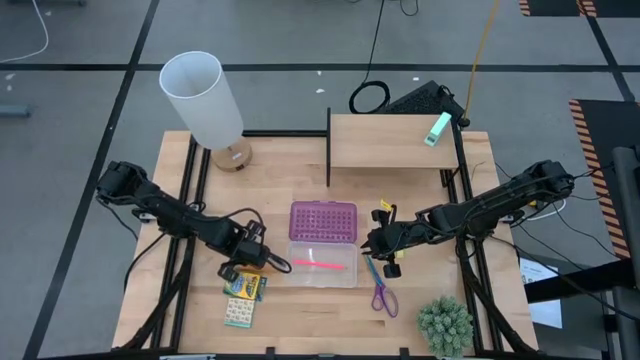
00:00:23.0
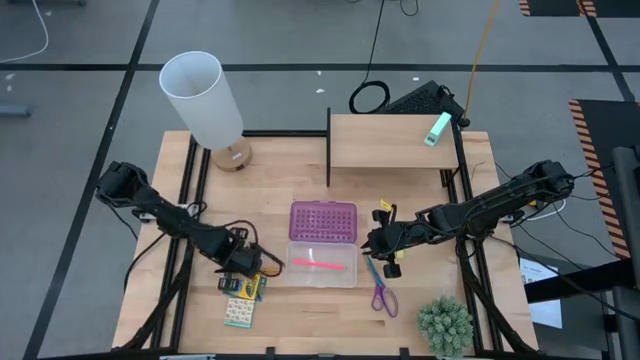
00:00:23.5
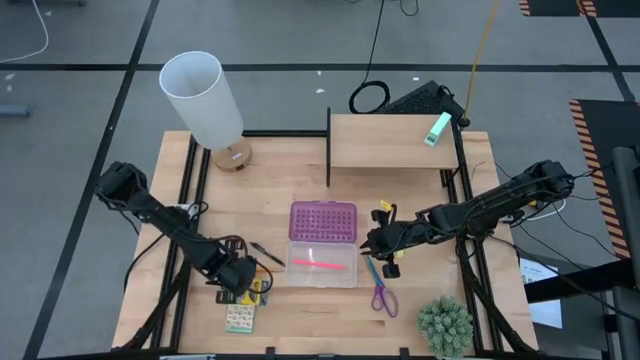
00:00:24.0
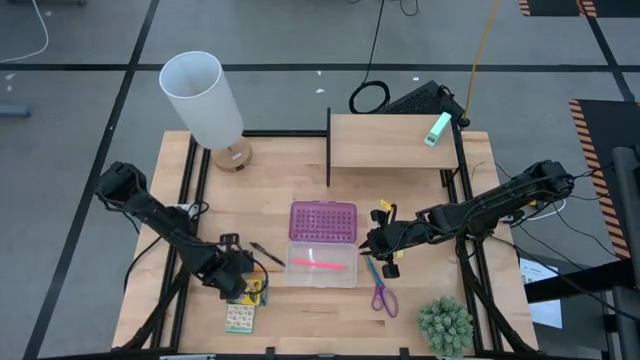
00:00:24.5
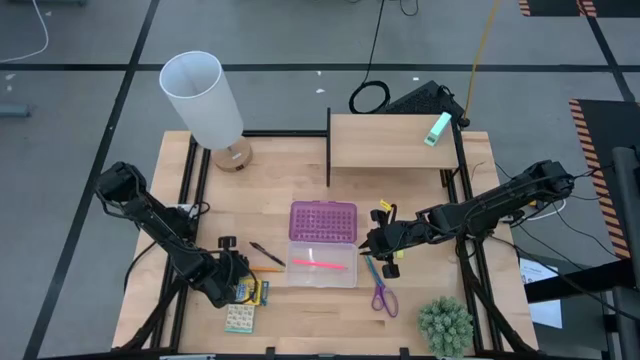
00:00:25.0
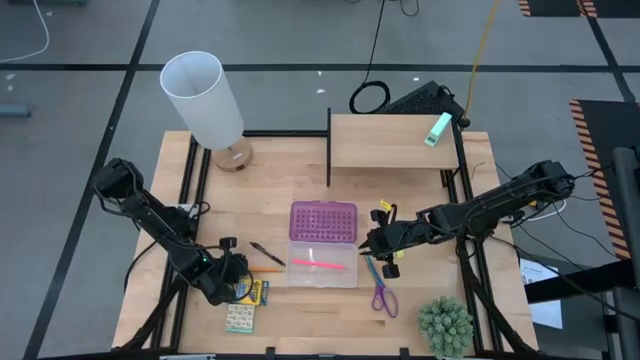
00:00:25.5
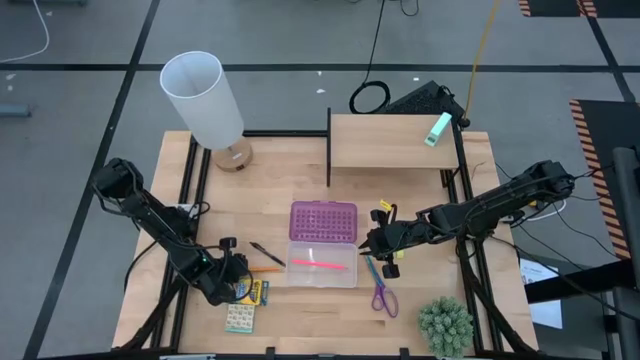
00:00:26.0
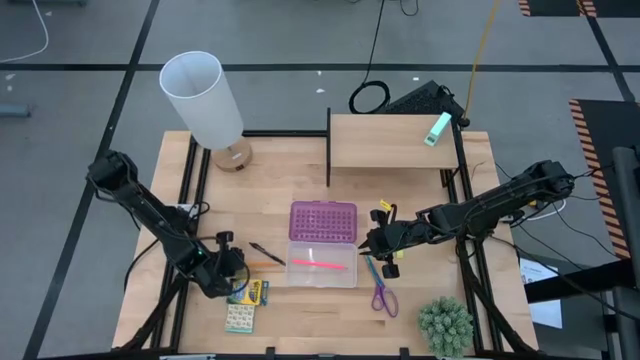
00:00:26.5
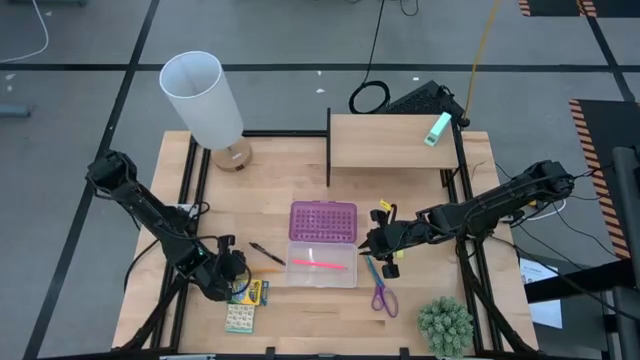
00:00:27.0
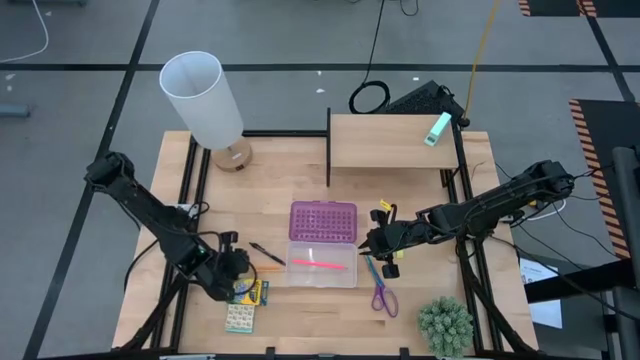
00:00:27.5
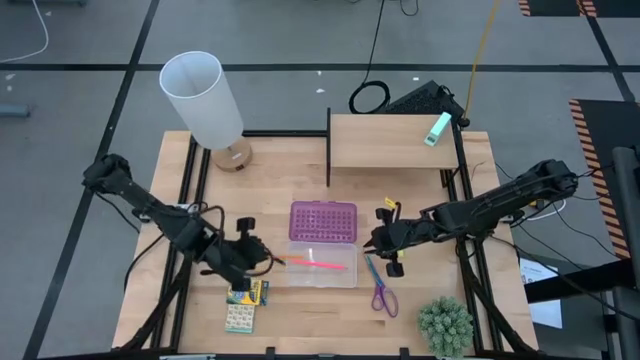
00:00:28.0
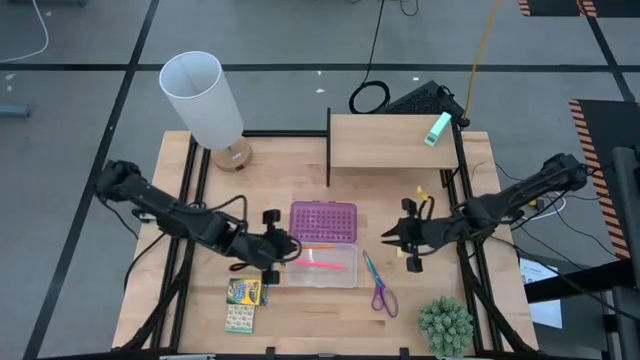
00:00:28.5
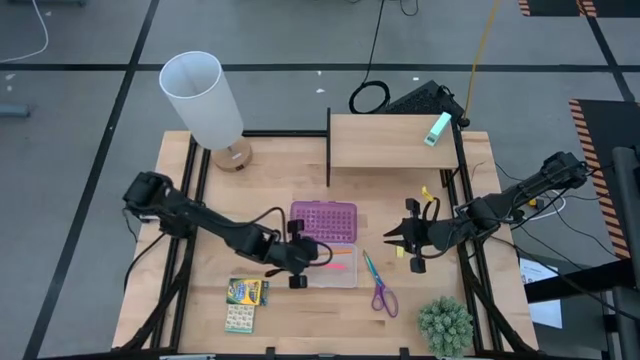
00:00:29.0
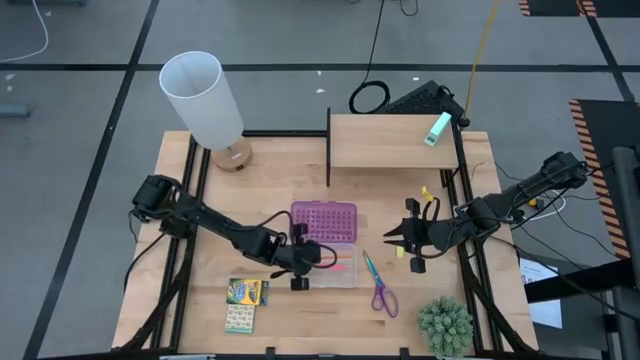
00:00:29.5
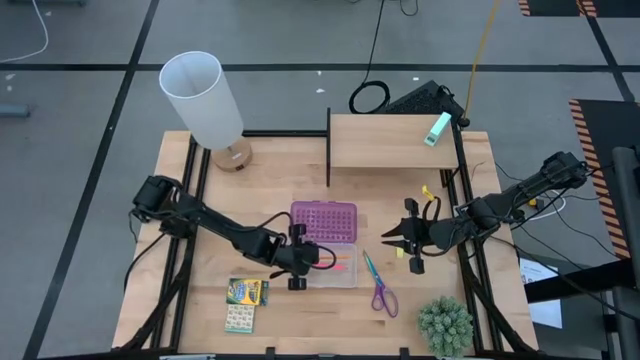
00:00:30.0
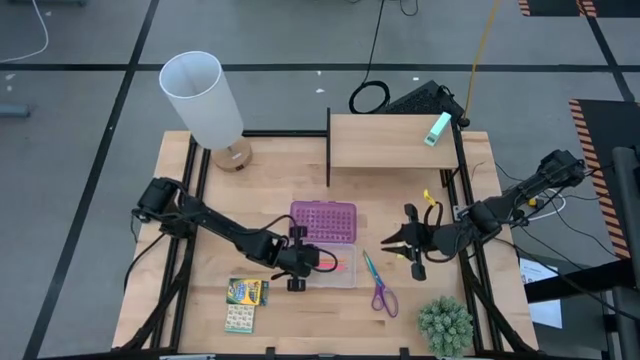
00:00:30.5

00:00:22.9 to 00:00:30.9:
Task: Pack school essentials
Put the yellow pencil into the violet plastic pencil case

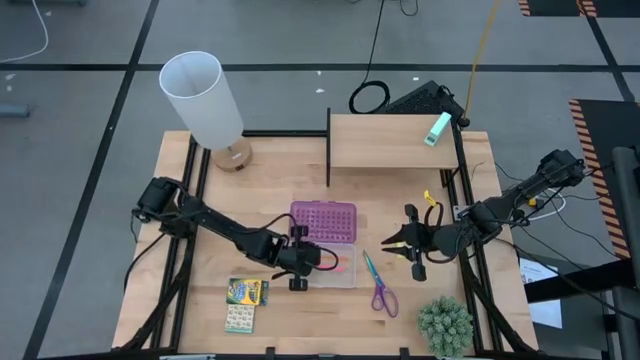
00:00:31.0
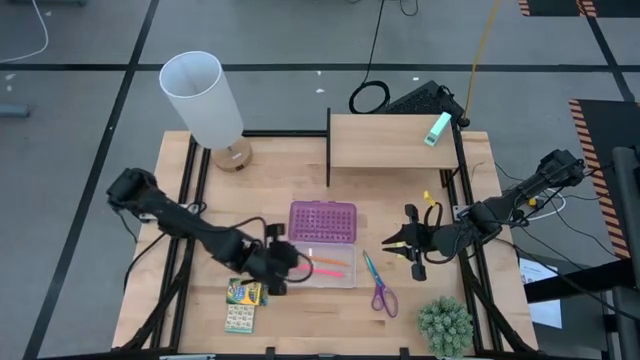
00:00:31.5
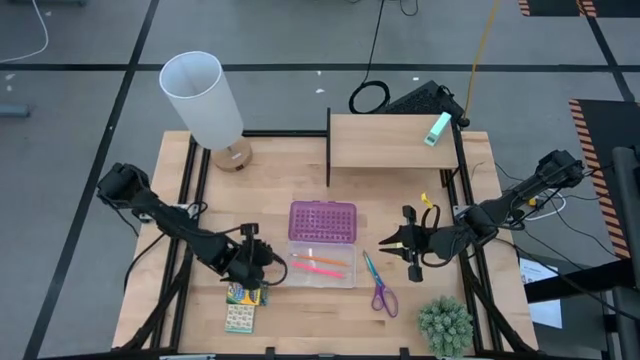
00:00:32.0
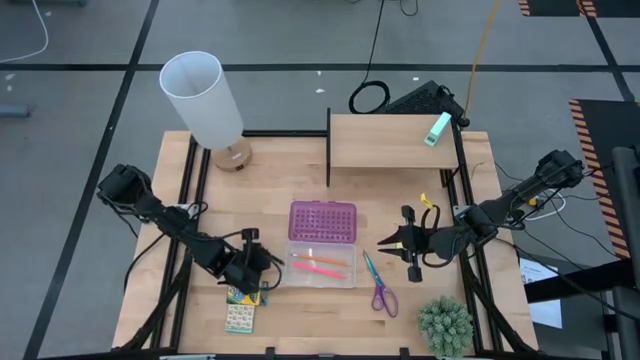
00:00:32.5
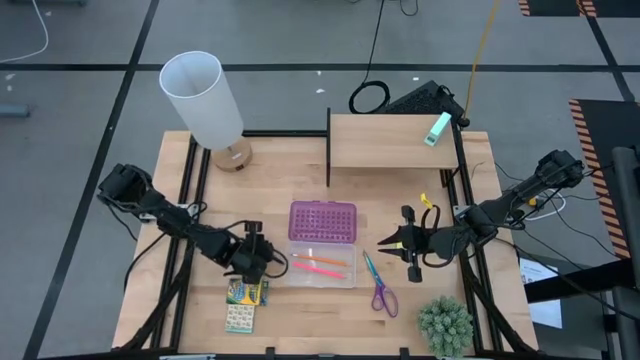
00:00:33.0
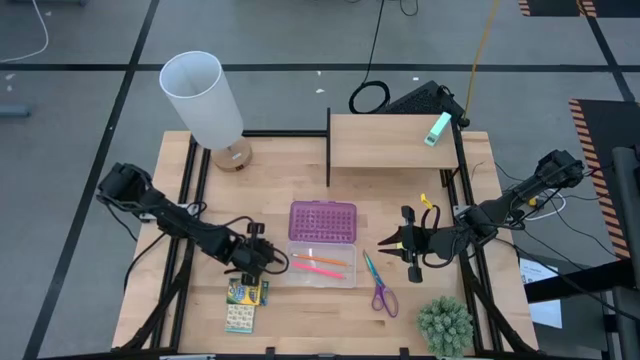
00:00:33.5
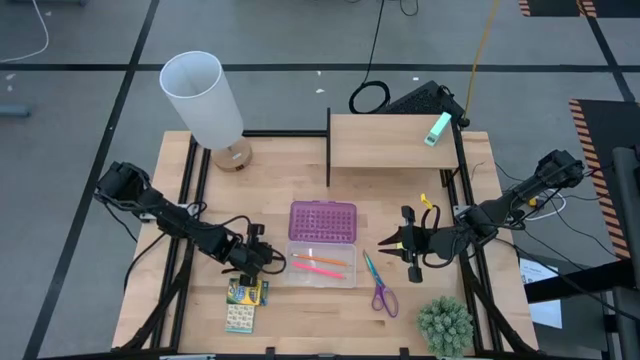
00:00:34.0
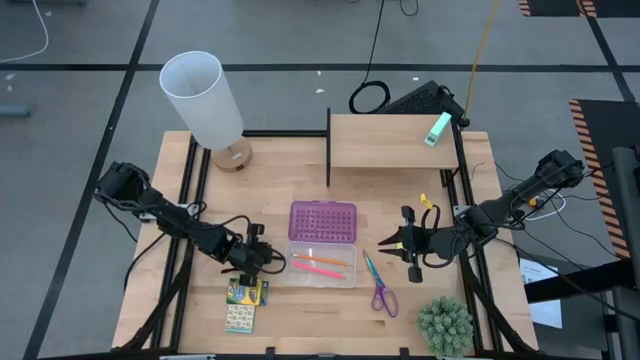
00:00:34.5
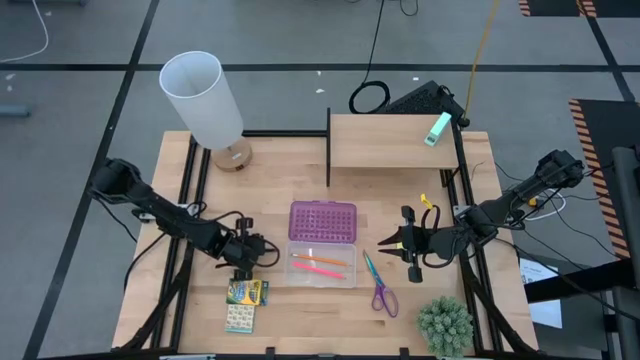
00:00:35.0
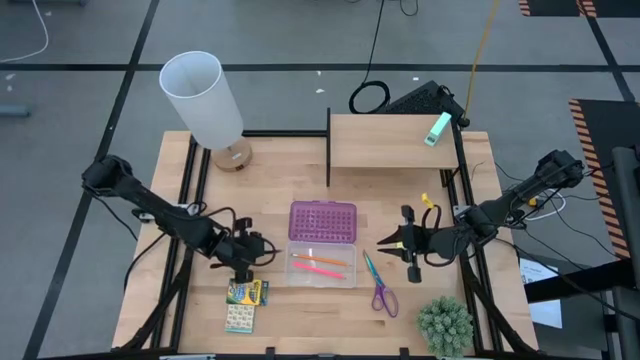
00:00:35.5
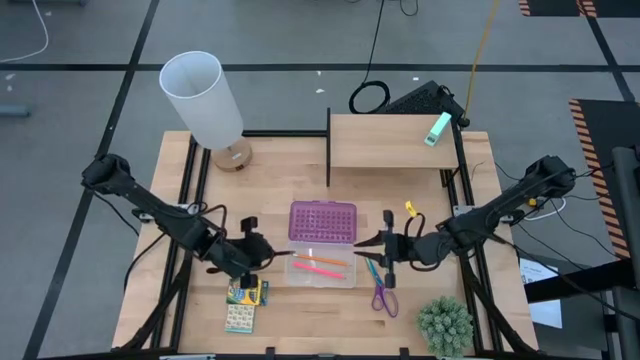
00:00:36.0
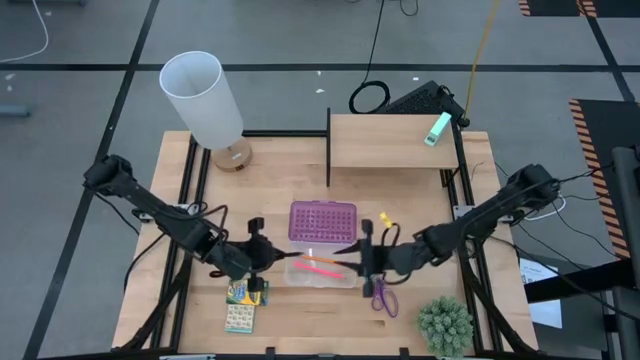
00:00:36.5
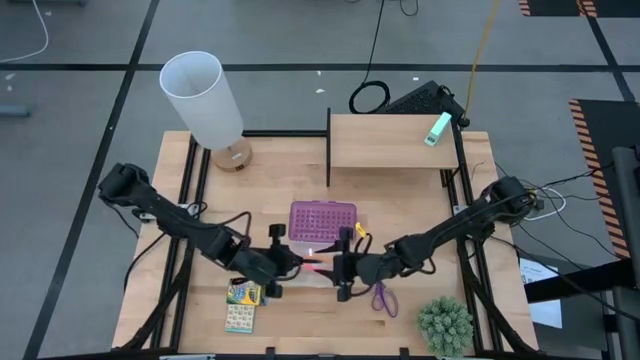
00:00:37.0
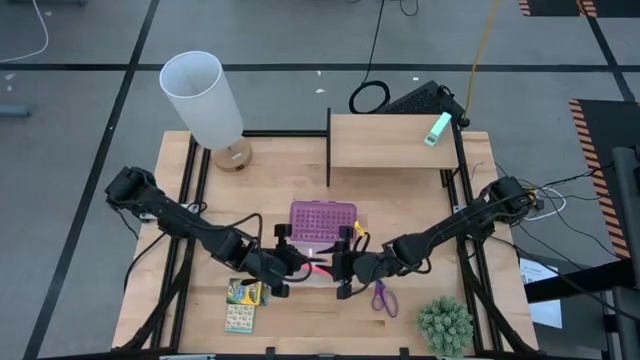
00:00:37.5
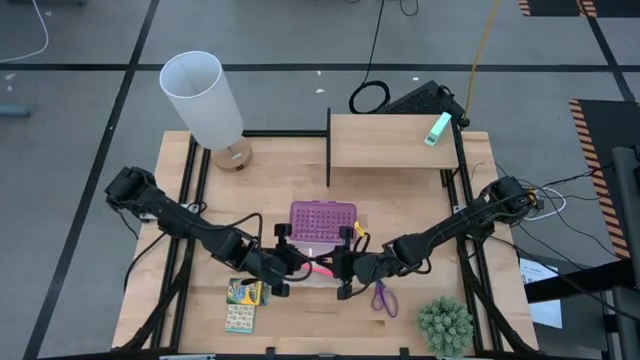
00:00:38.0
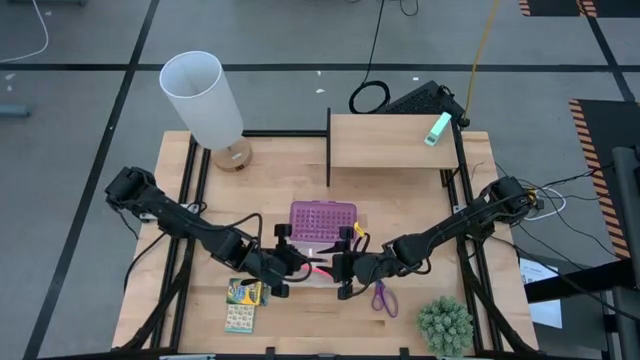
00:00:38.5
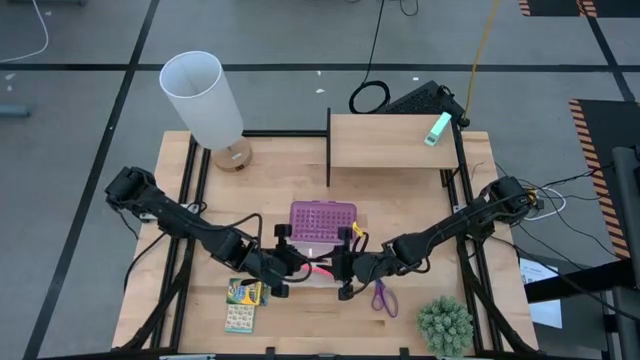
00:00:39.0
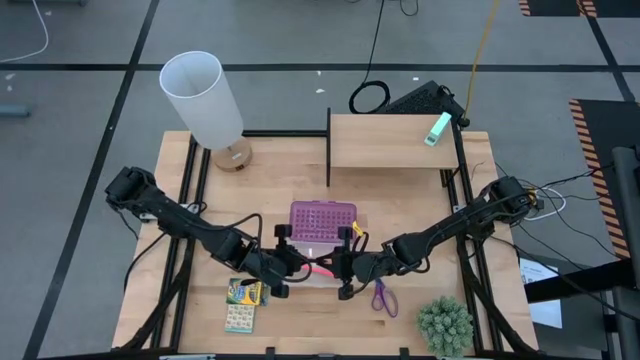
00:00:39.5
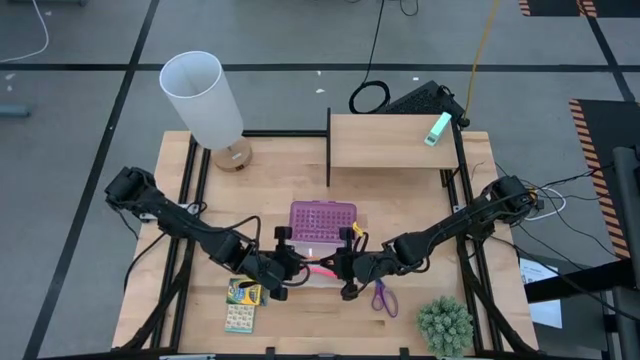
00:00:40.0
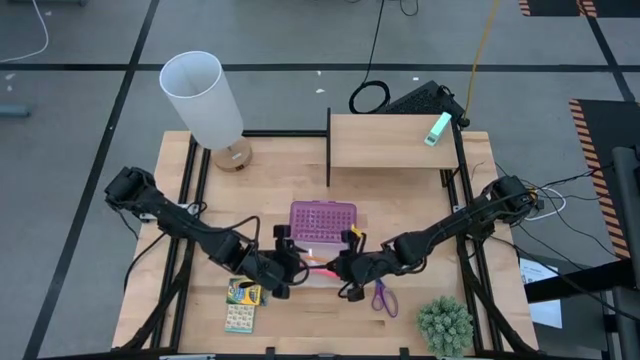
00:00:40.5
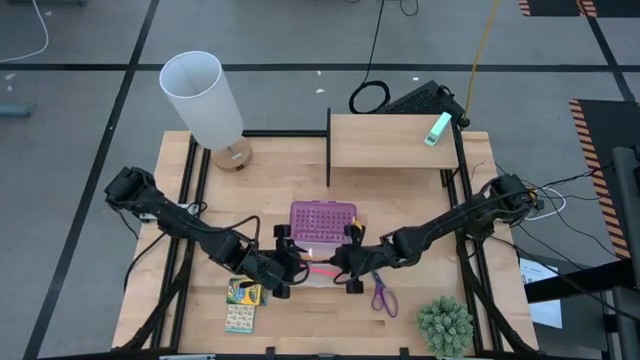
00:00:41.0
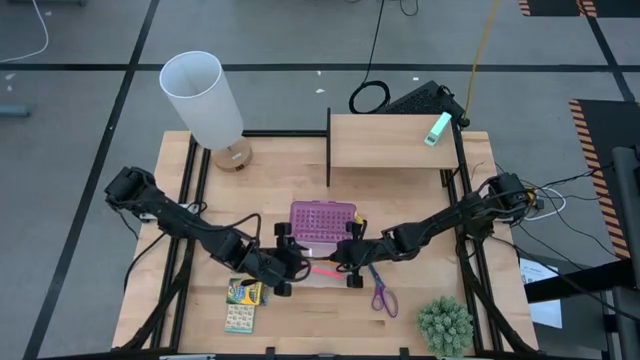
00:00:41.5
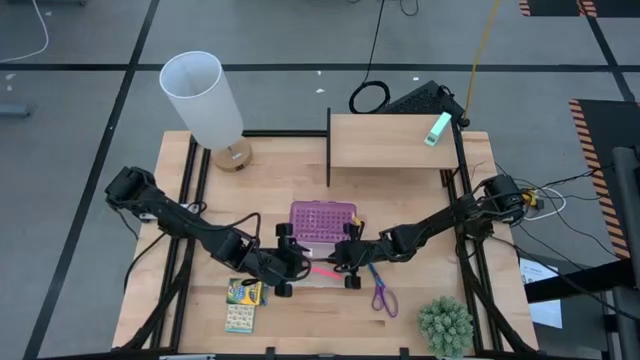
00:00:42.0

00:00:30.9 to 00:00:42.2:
Put the black ballpen into the violet plastic pencil case
